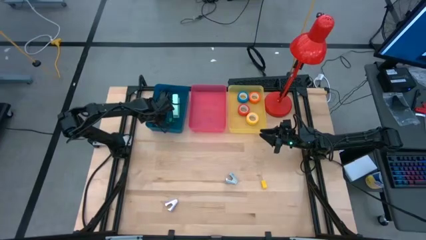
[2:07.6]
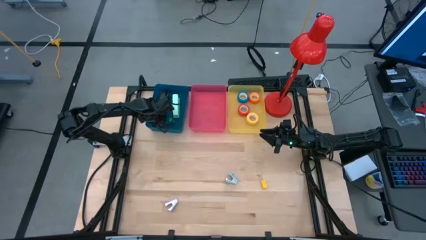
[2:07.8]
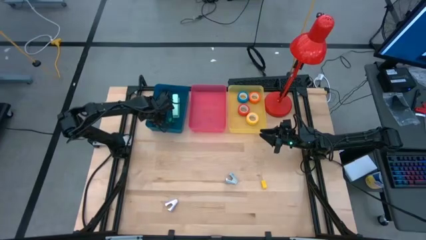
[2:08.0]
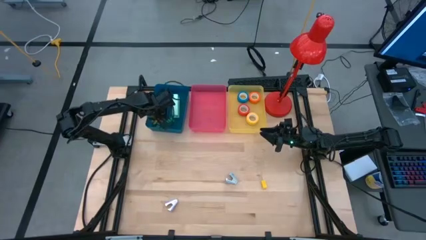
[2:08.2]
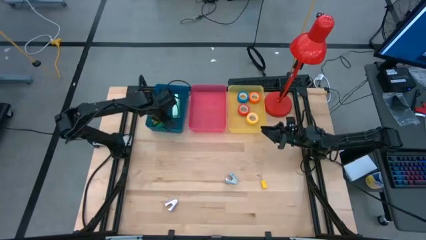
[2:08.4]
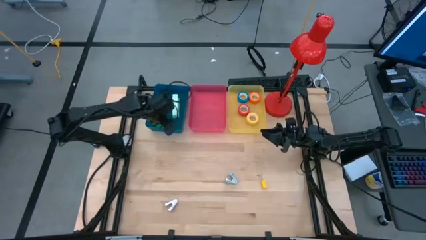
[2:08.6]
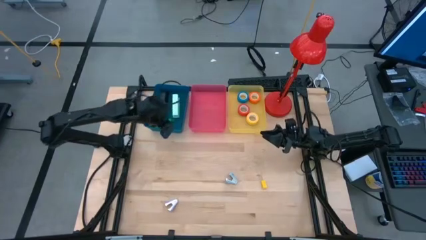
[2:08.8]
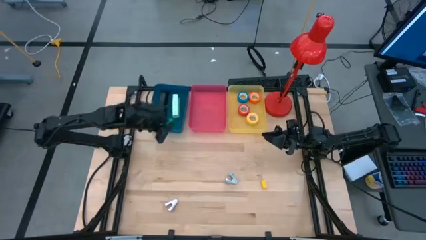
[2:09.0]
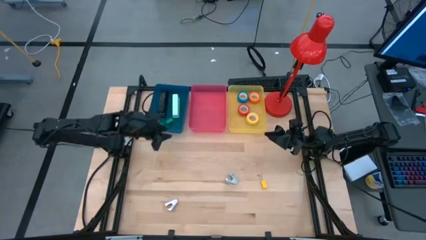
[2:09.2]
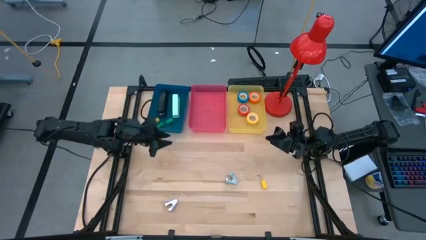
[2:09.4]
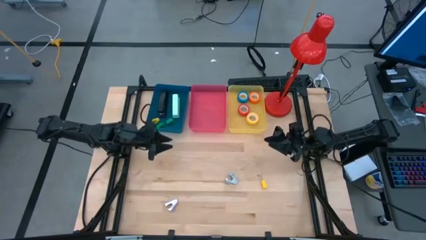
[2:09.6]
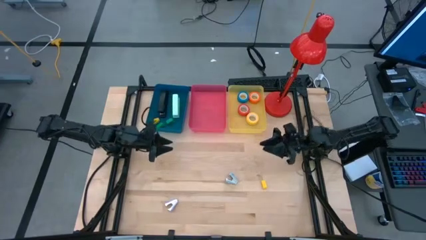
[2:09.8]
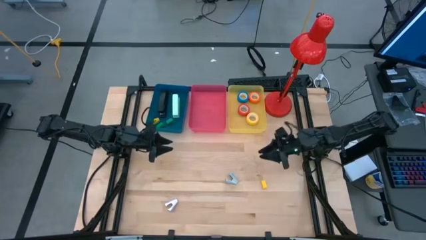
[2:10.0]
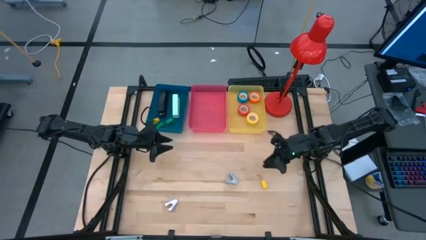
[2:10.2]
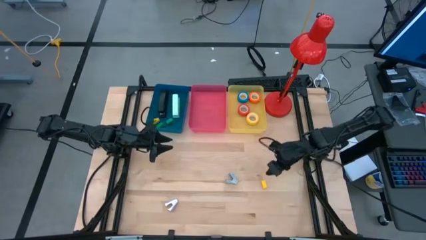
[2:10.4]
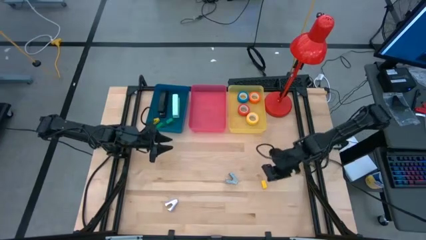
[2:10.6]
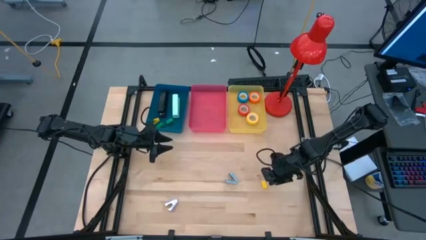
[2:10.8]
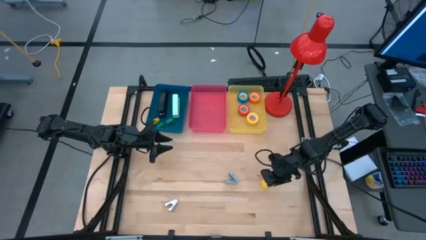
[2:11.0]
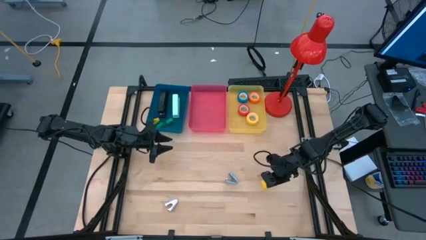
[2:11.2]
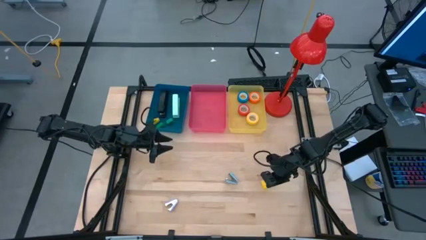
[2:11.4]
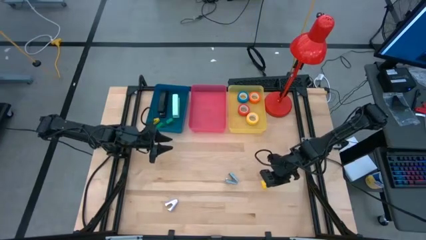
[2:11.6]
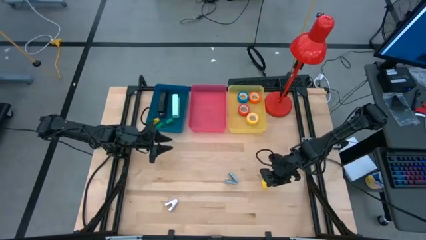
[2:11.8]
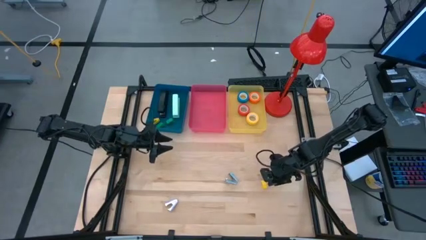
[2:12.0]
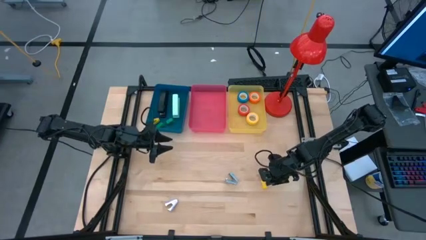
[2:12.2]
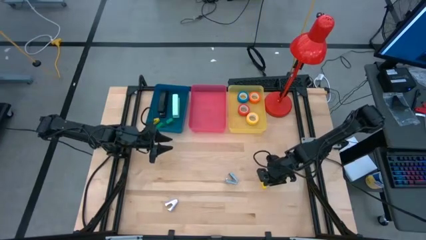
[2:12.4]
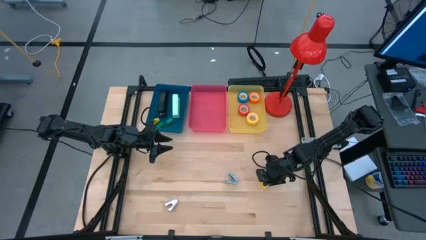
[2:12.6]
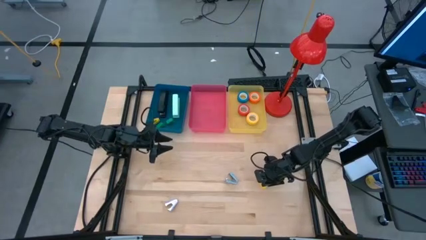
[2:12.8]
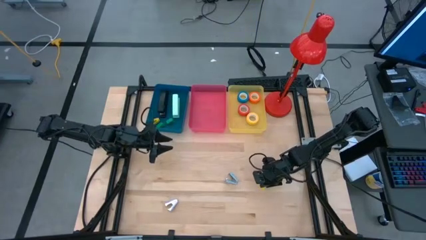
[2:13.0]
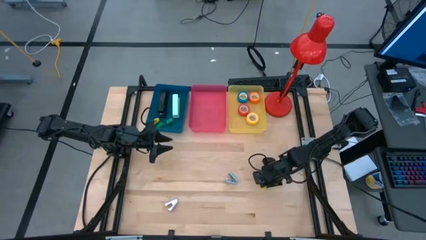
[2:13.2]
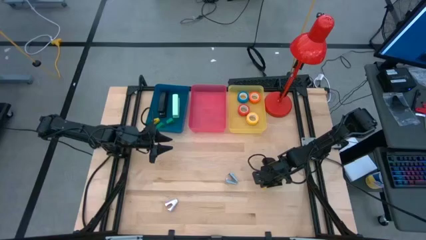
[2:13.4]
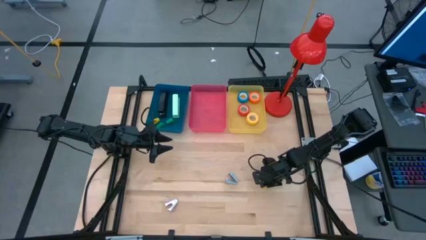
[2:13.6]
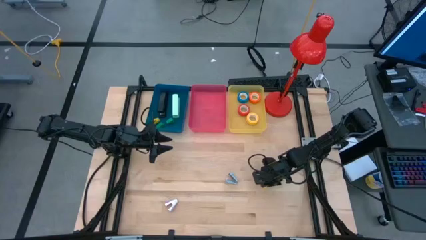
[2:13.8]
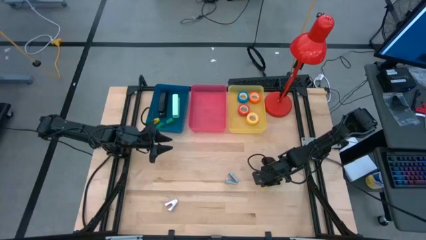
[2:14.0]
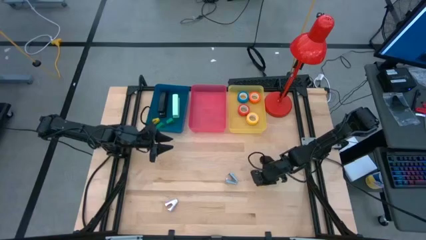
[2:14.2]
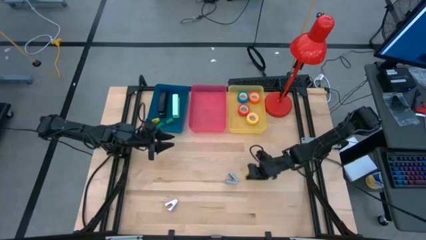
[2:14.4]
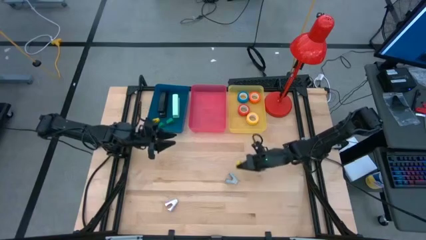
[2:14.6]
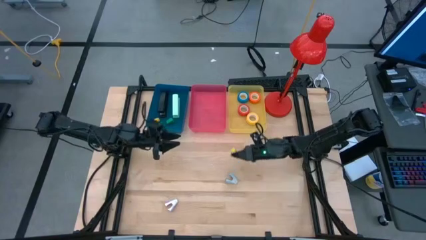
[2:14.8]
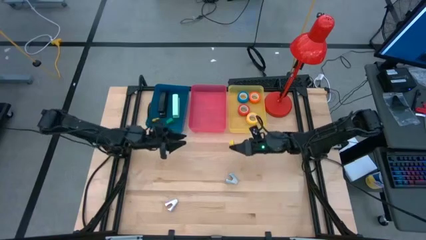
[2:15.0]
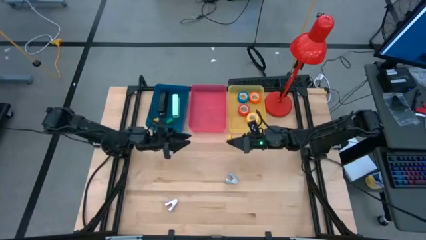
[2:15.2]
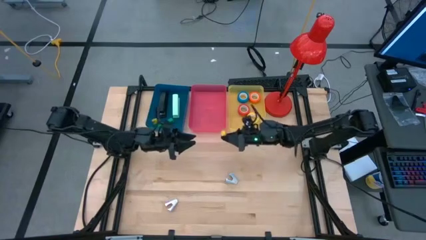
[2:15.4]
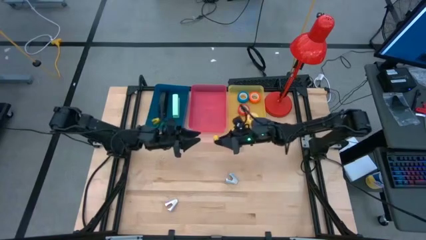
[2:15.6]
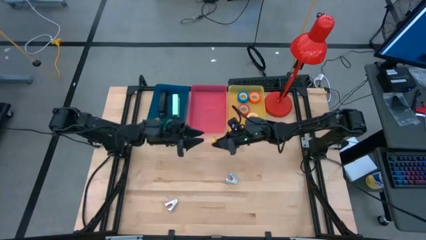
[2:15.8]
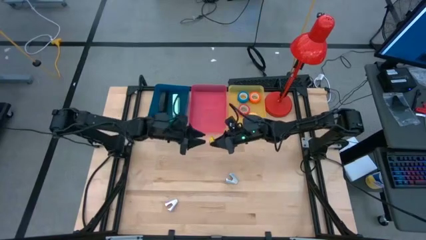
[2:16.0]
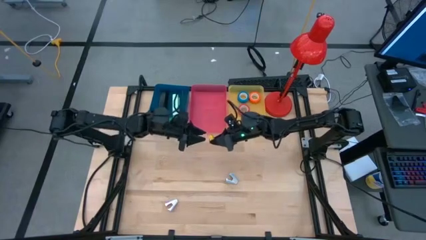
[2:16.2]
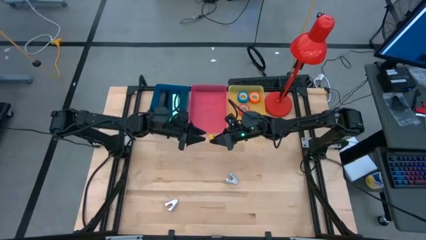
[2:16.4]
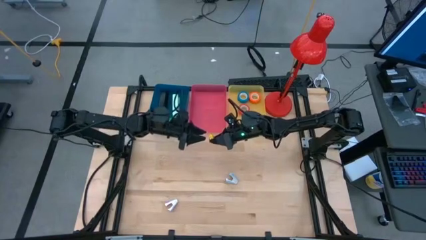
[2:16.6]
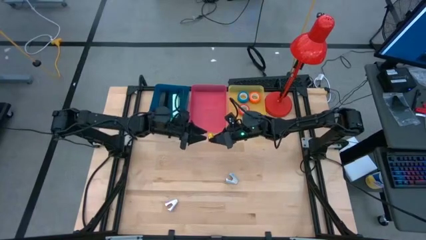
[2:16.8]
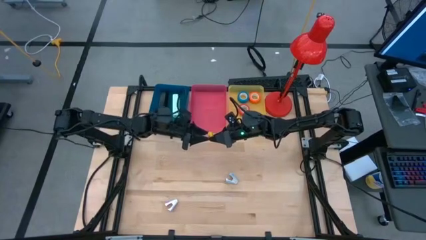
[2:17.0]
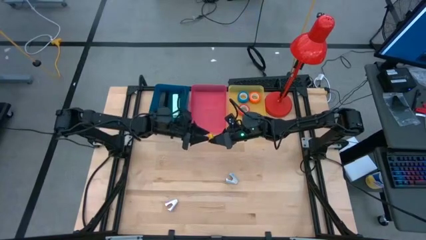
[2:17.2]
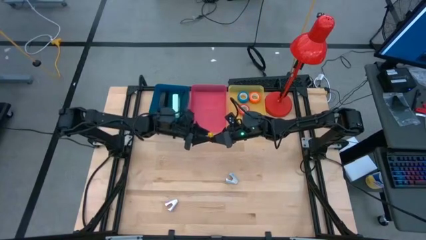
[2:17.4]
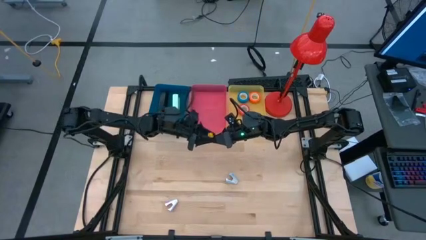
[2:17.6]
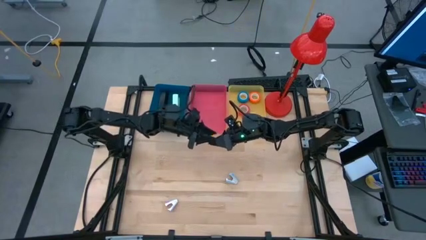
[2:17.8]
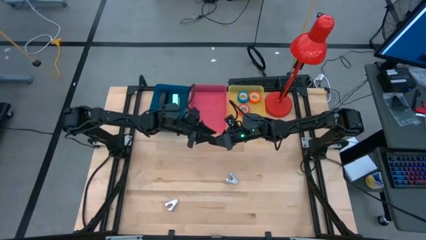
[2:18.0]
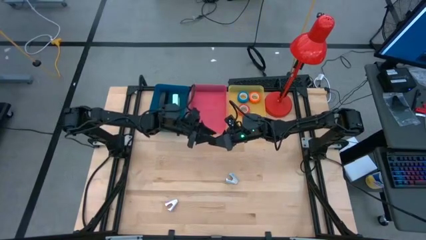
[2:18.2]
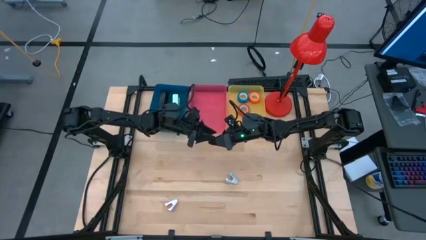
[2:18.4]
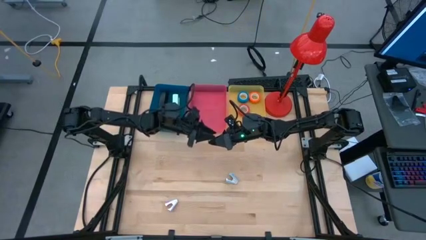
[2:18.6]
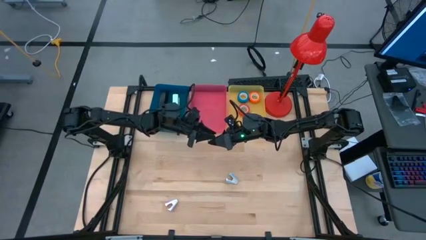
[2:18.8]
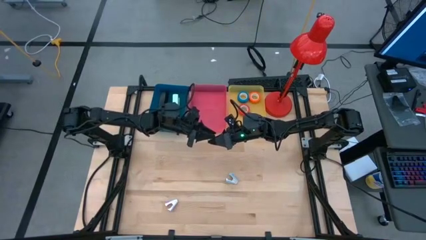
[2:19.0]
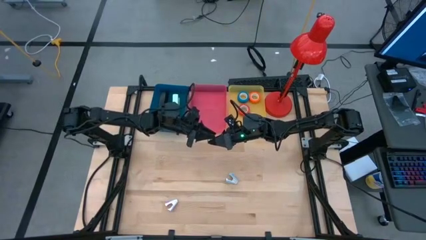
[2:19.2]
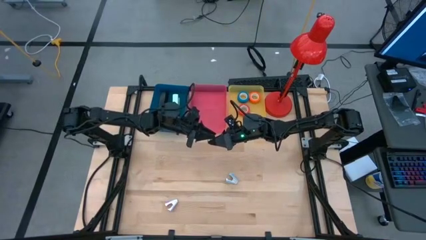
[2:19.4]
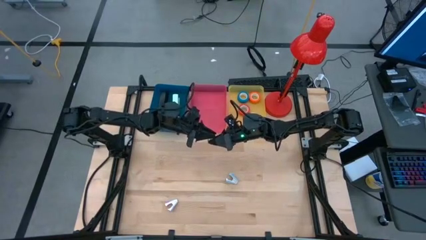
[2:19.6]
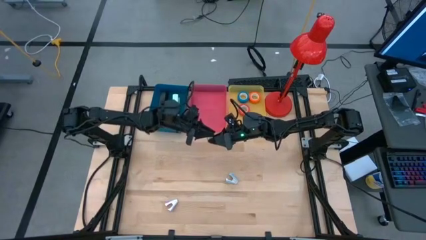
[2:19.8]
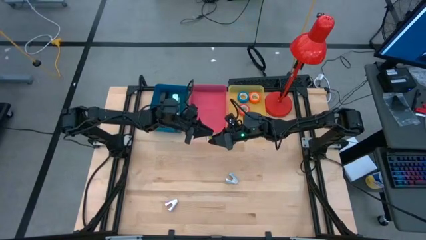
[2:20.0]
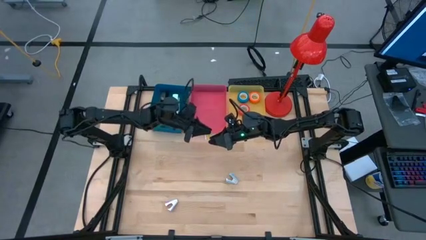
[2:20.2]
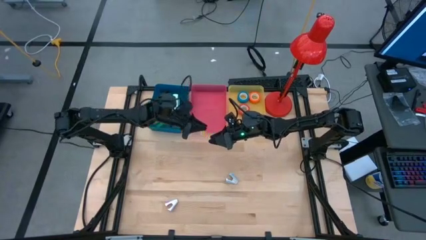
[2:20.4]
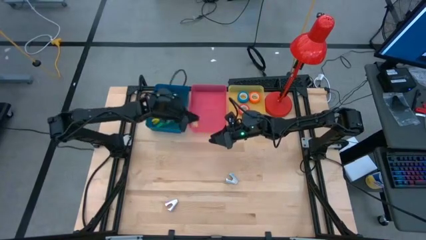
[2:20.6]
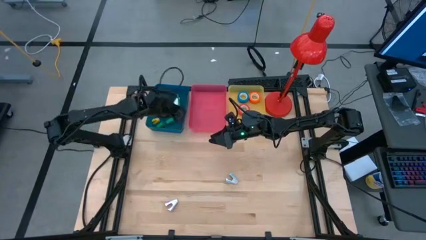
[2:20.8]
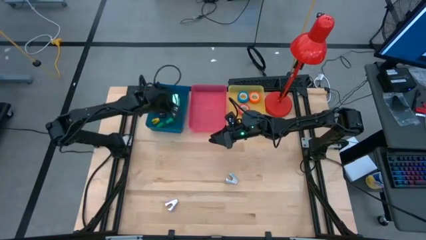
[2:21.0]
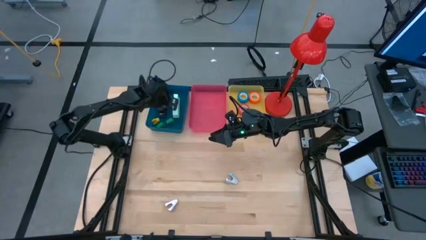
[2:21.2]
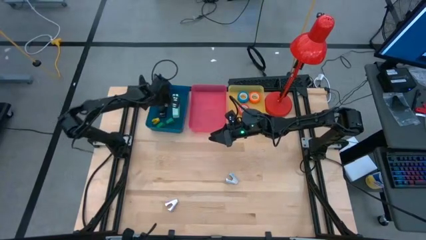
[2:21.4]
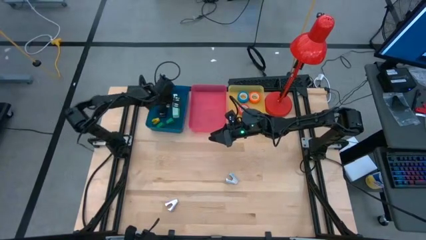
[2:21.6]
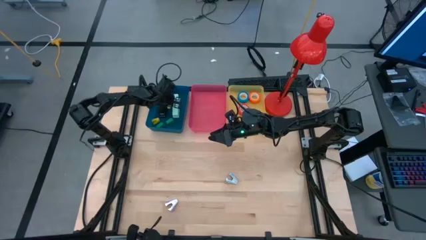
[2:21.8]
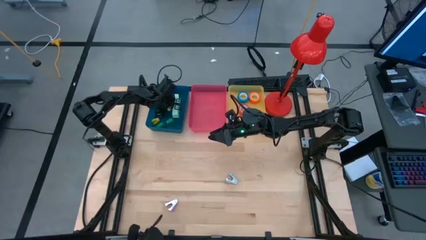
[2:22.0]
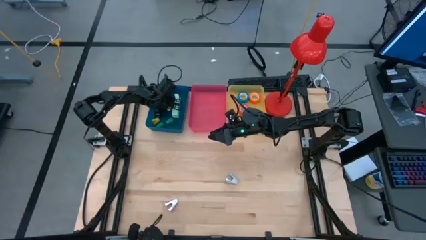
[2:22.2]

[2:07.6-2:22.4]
Task: Pick and place Stapler, Stapler remover, tape
Put the yellow stapler into the blue bin
